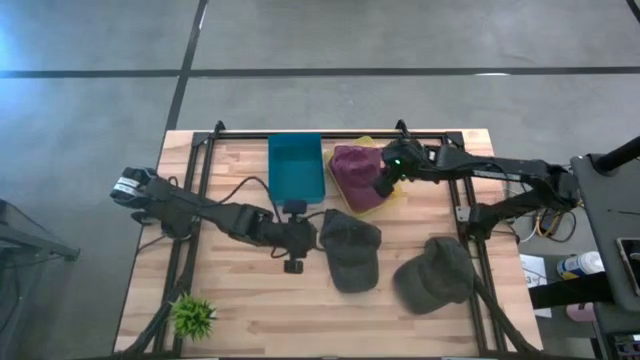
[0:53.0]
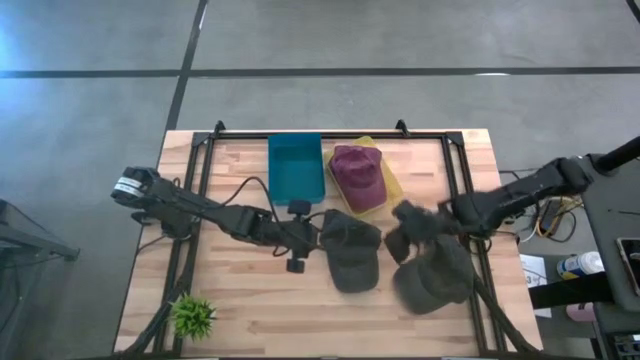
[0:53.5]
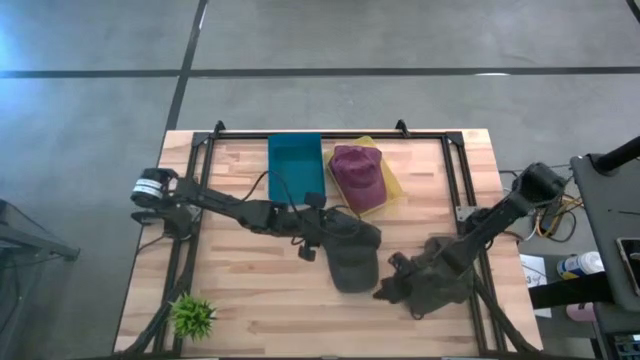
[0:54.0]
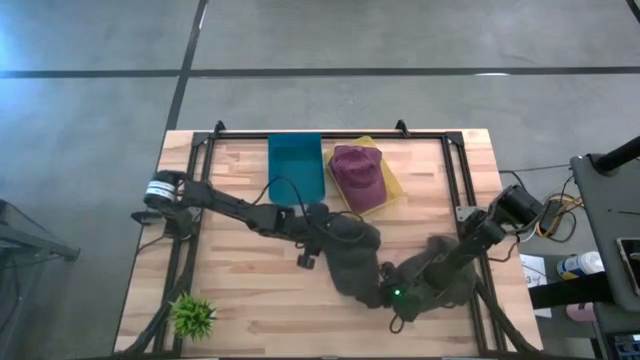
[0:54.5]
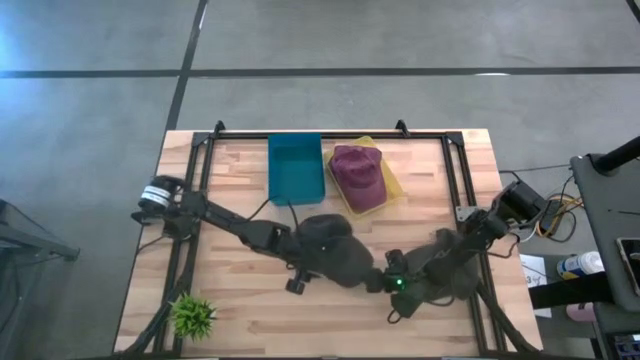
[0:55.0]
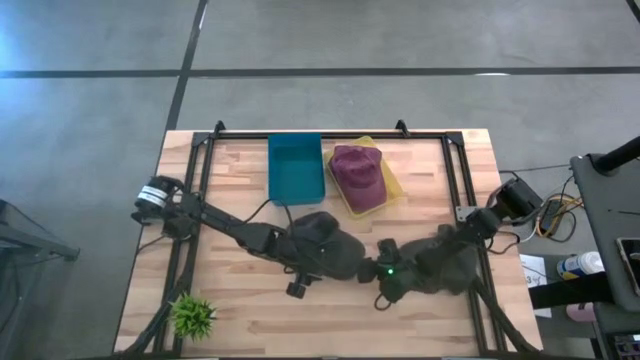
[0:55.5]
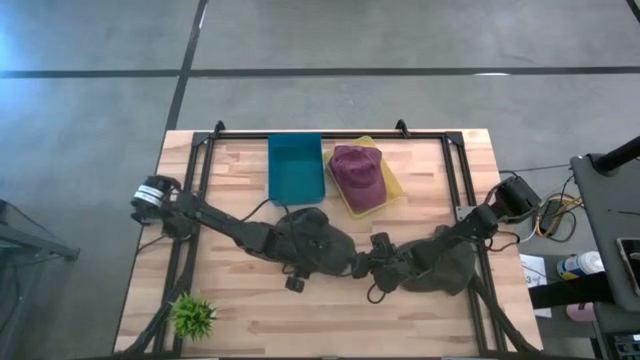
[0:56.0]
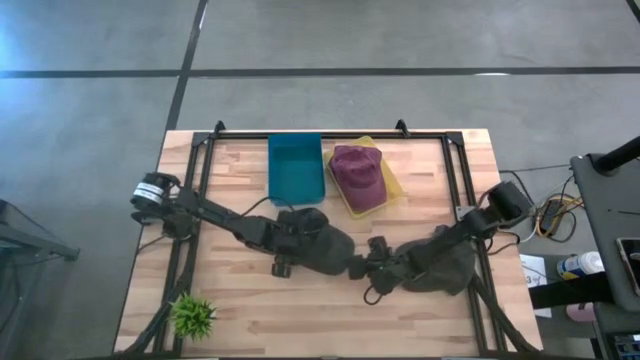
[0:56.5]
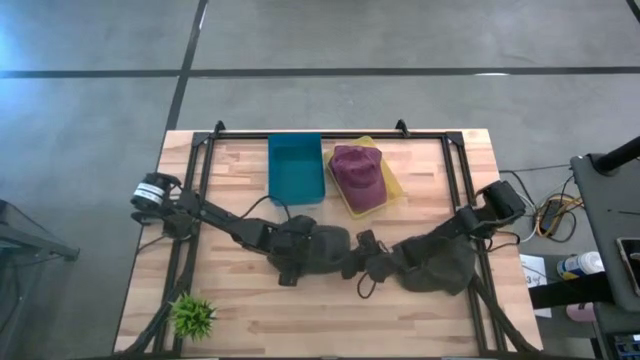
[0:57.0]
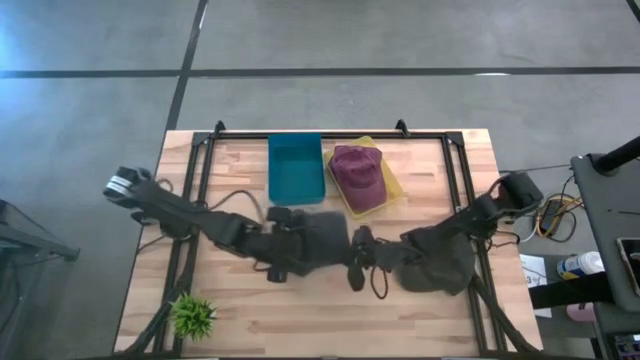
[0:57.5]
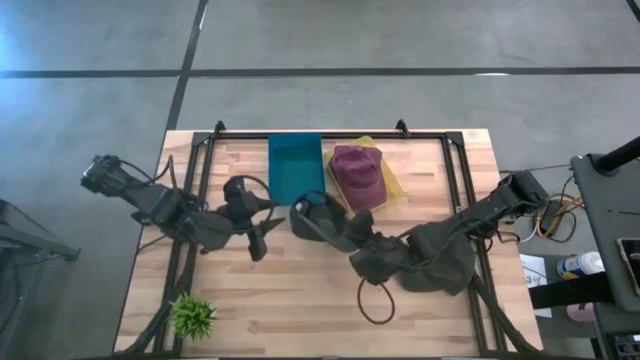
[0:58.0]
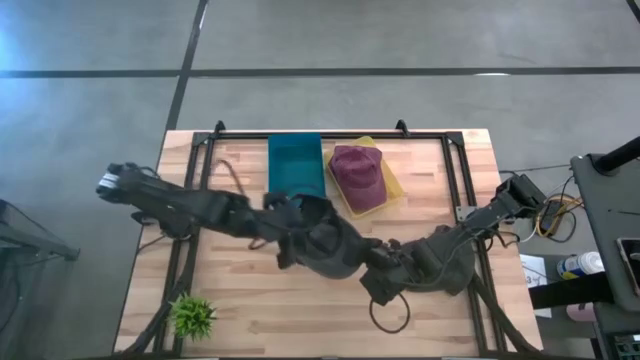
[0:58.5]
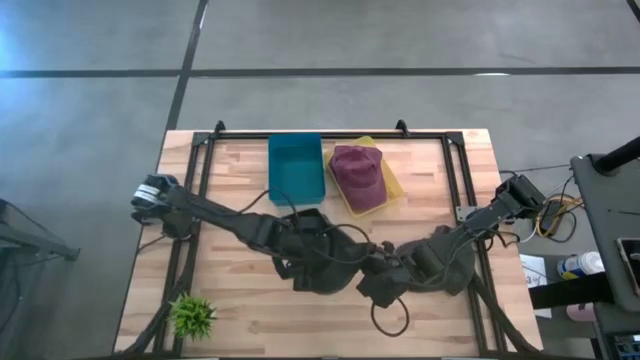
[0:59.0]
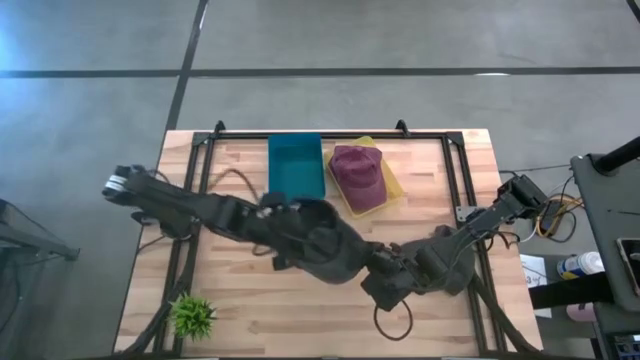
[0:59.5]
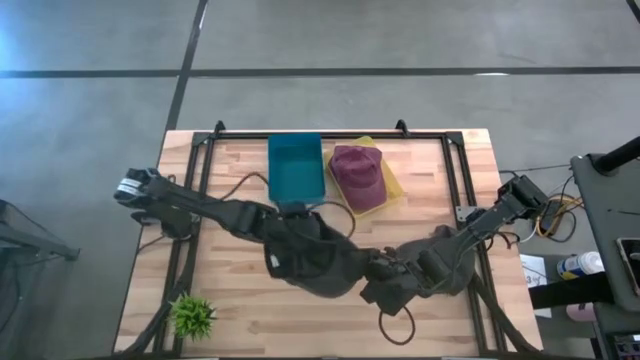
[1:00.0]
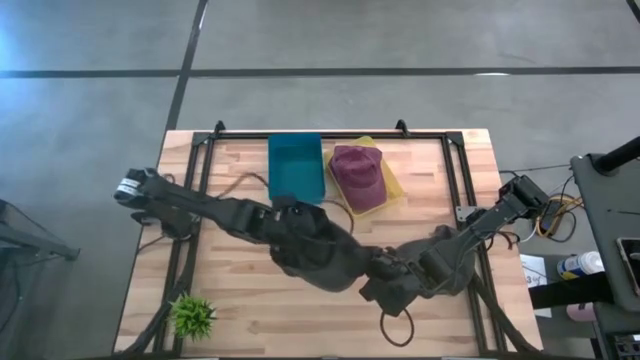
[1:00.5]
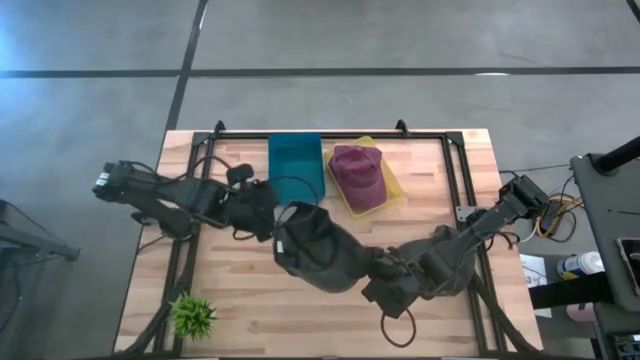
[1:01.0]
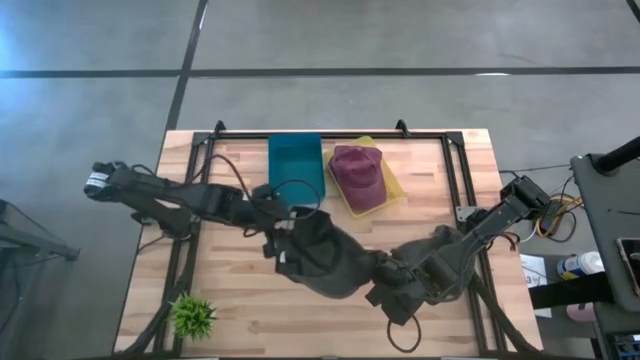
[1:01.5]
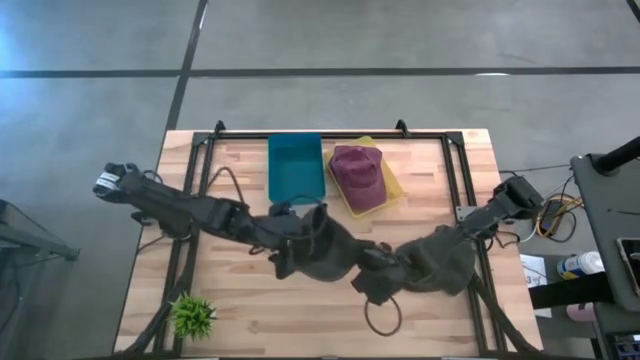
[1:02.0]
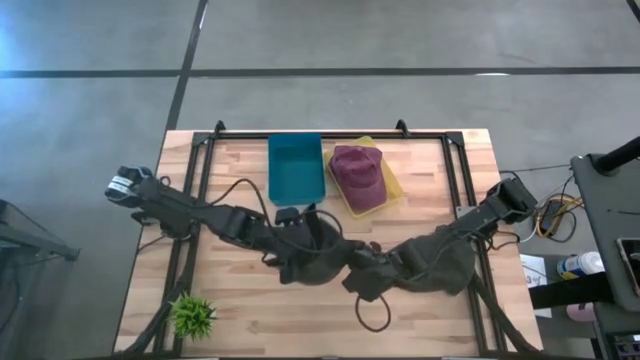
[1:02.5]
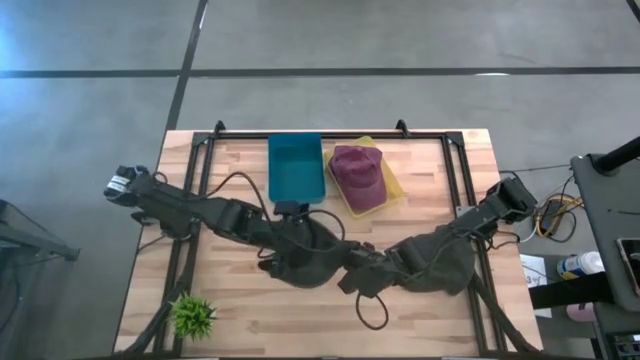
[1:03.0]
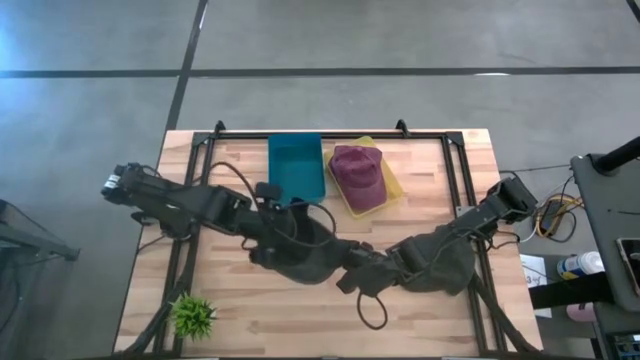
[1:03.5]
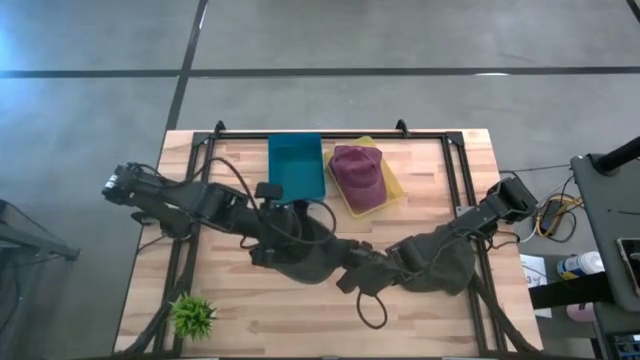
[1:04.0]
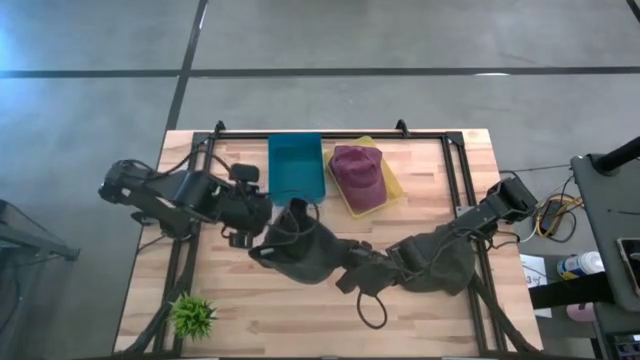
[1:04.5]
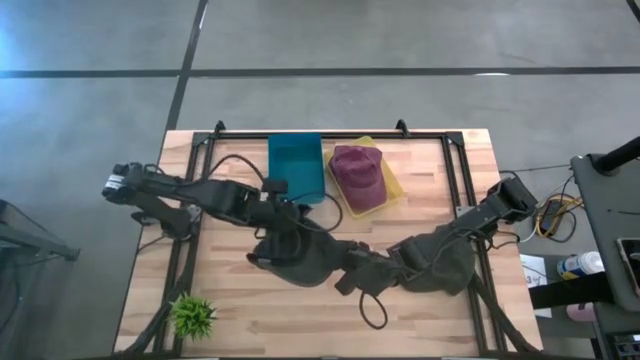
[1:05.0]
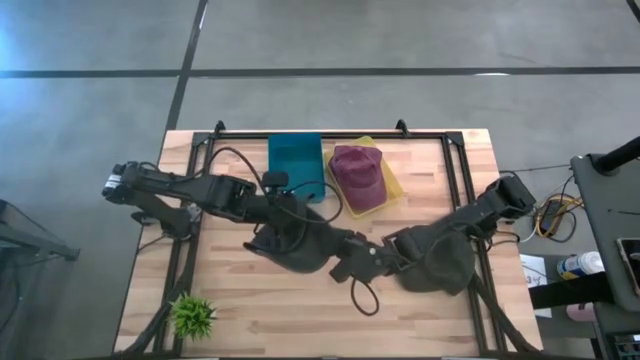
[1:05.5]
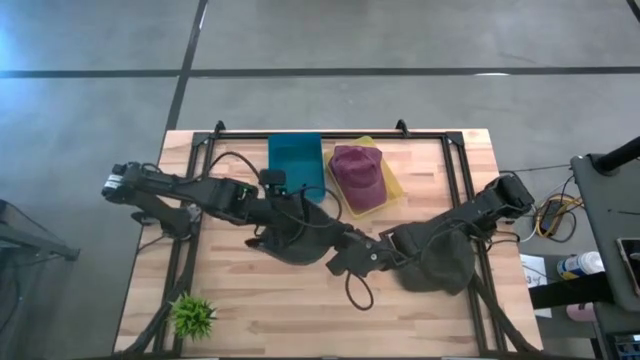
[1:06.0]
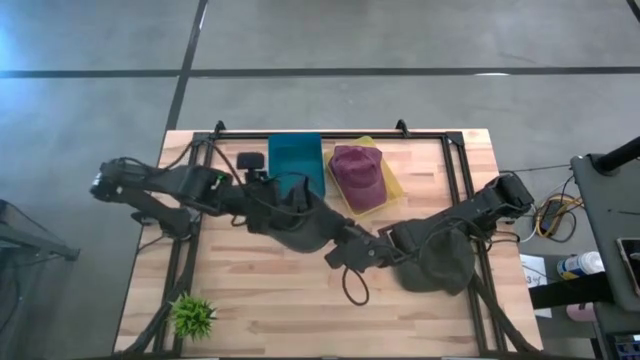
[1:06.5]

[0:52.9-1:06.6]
Task: Pick & Place hat
Put the left black cap into the blue bin
